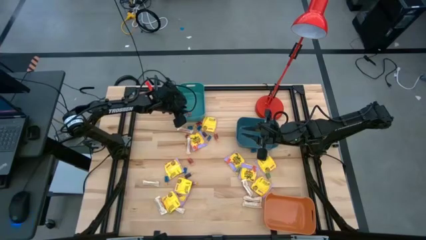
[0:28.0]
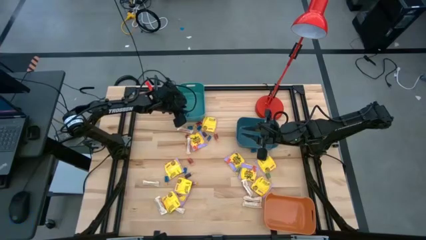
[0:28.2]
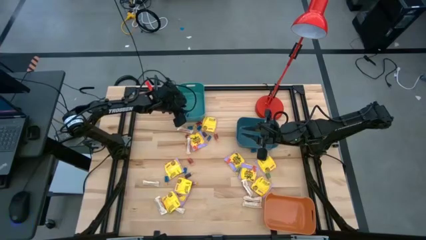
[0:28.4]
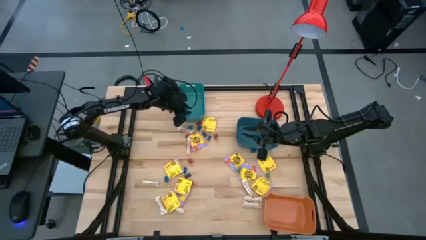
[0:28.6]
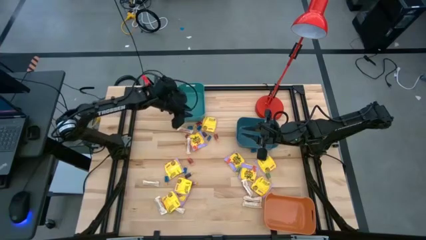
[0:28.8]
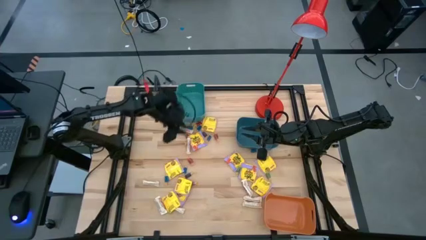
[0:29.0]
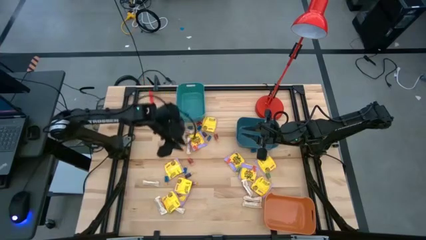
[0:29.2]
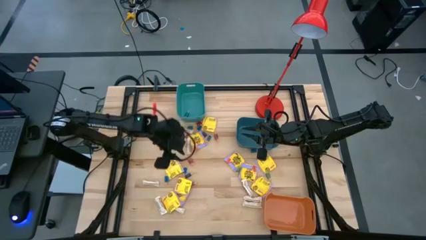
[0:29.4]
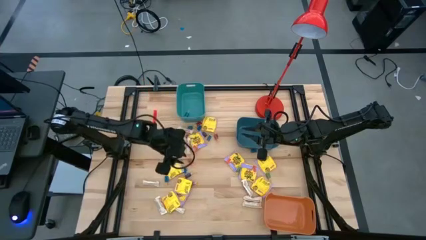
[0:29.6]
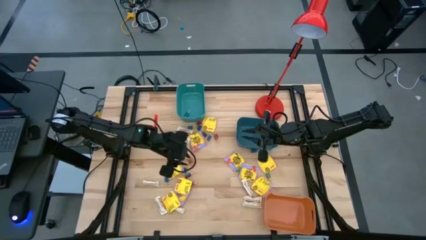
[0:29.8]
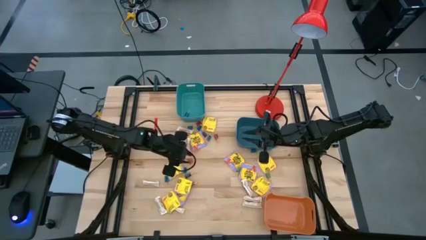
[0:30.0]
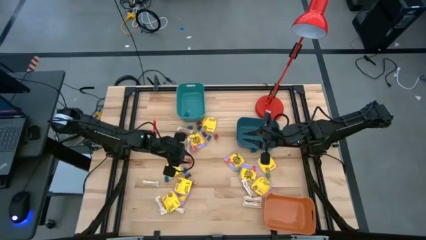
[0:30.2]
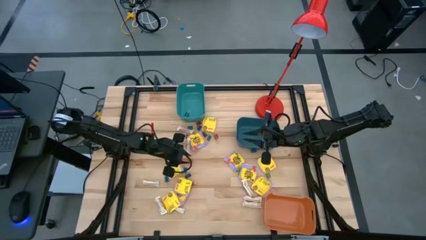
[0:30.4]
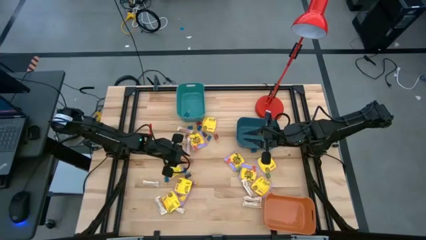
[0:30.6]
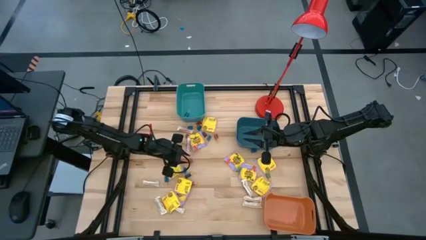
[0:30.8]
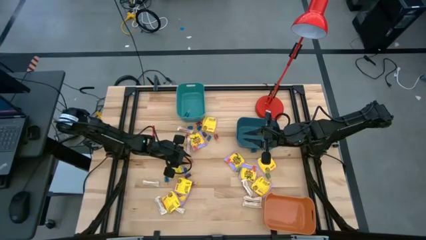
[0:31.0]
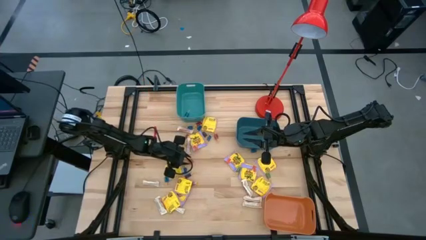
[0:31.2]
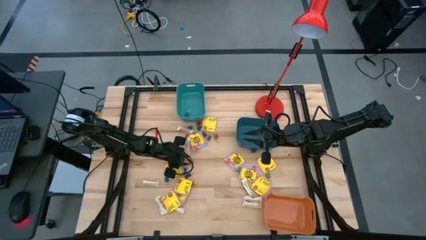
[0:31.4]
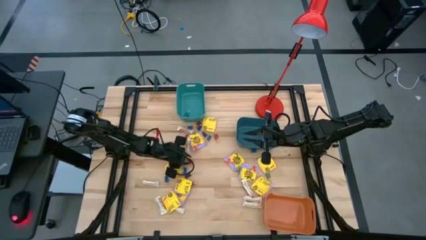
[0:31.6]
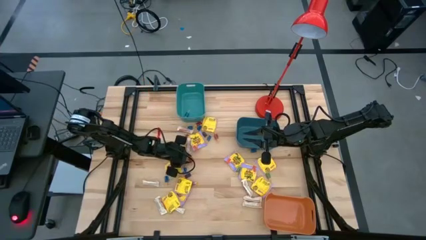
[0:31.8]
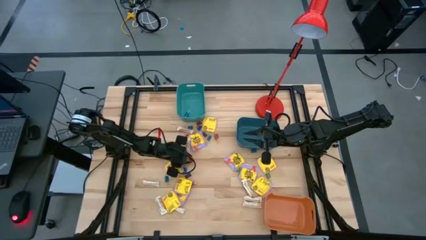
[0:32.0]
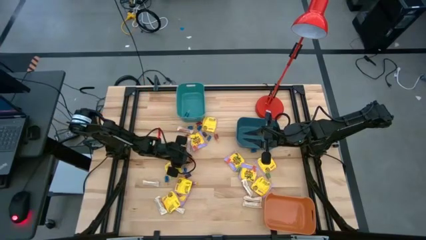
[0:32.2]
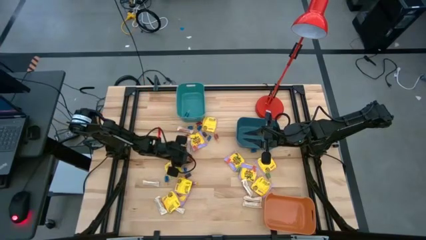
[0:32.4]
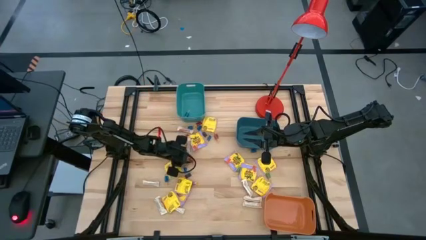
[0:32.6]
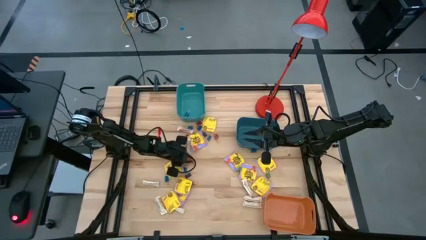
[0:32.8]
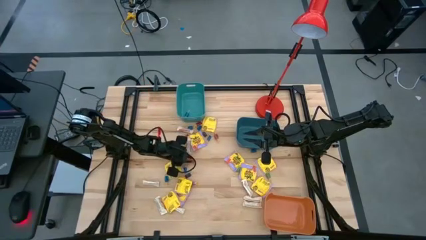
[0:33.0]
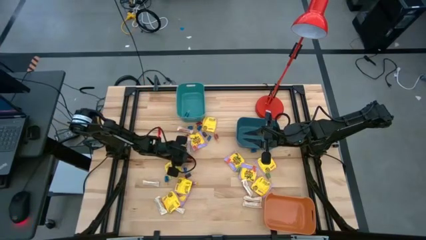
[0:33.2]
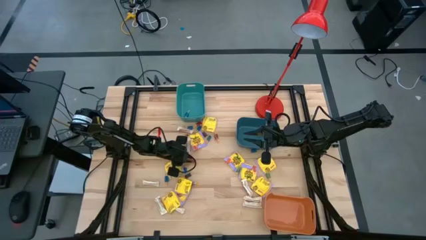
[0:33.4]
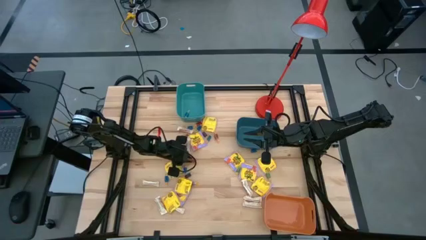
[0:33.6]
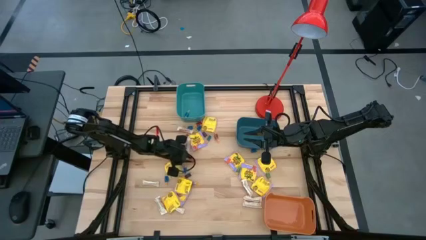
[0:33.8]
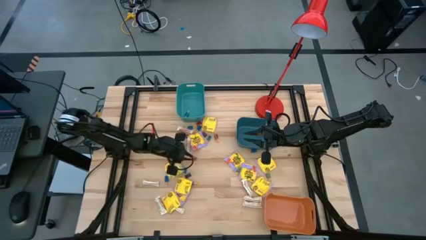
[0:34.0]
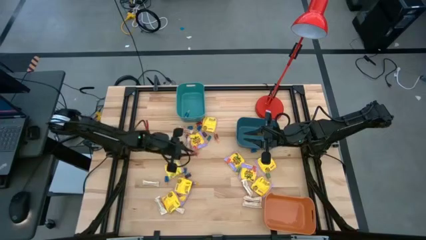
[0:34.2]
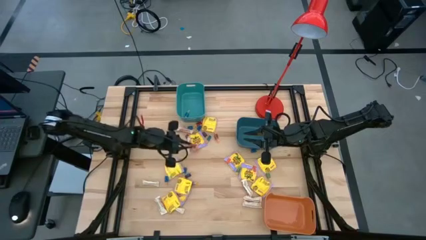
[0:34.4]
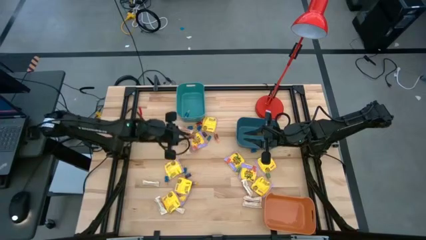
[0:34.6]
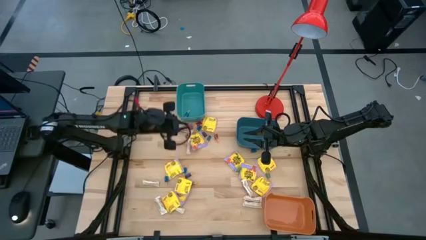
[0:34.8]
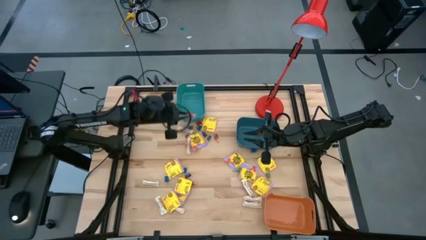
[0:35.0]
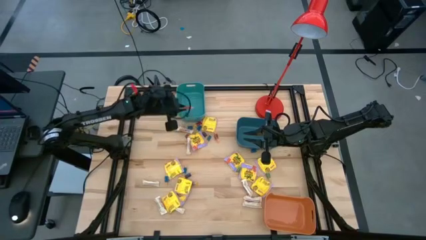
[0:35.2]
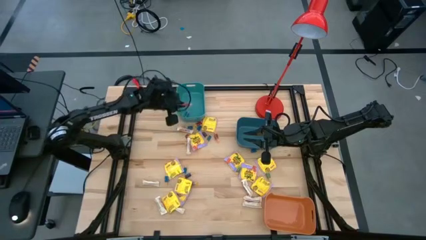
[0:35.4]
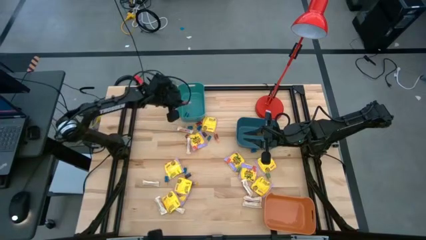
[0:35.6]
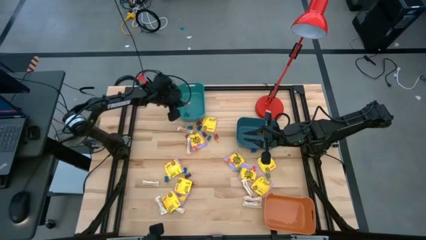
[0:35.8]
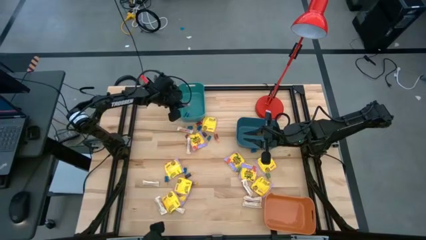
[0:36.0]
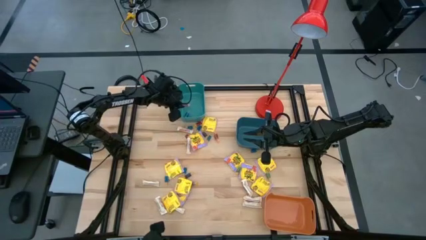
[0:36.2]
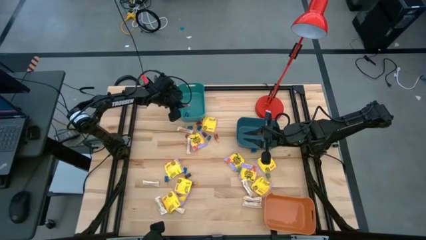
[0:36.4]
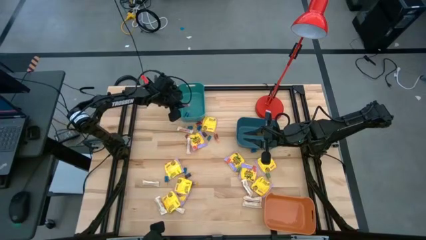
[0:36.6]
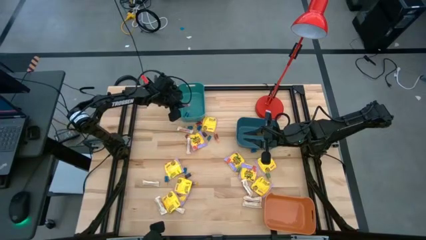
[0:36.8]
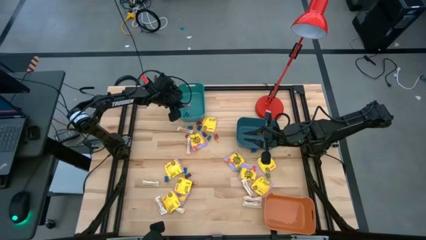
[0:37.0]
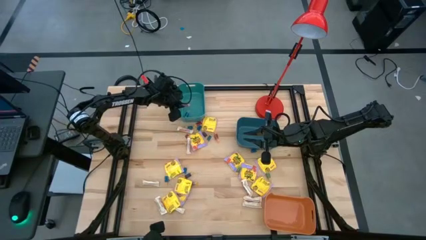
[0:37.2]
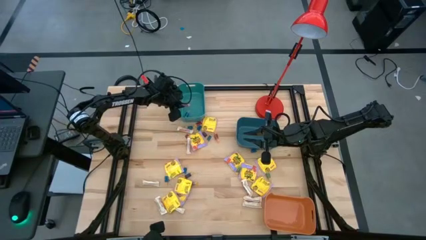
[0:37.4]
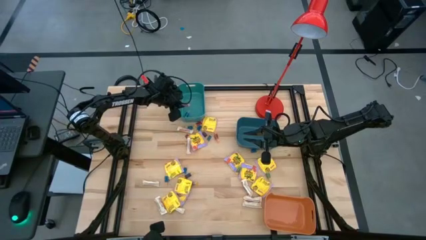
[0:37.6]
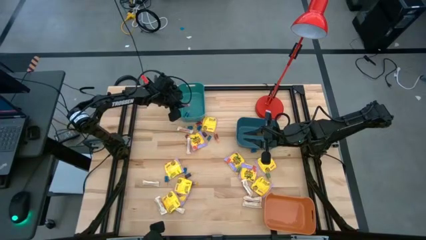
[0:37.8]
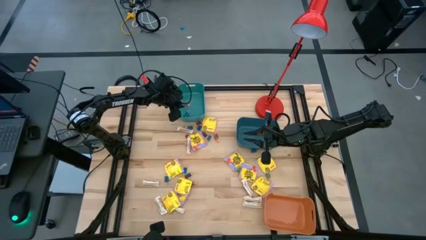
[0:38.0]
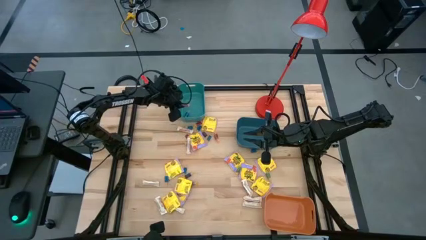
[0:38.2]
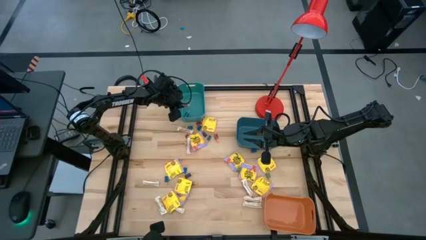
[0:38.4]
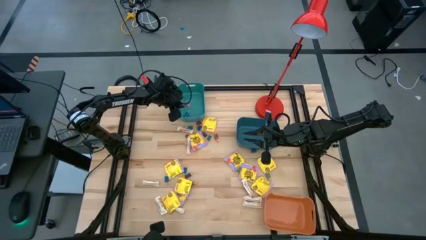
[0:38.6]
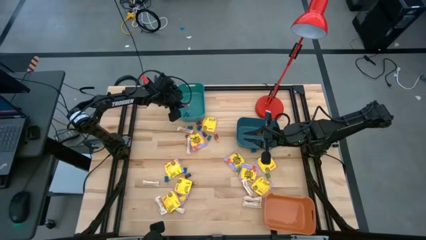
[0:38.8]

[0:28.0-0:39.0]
Task: Sort candy
Put the red candy into the green bin

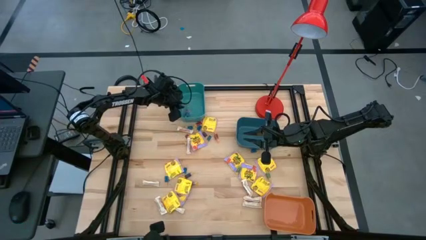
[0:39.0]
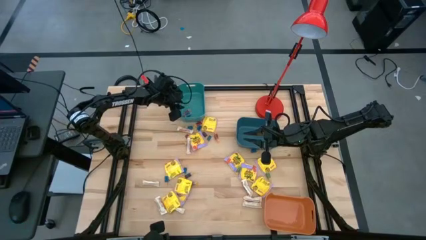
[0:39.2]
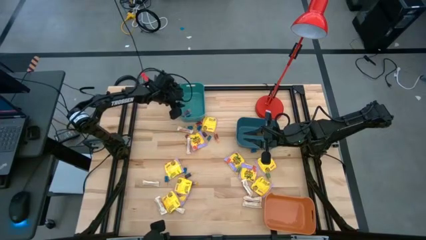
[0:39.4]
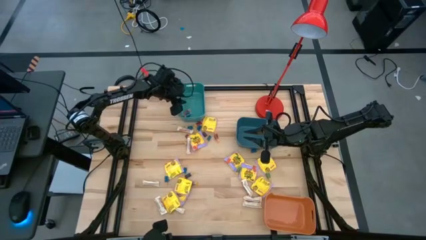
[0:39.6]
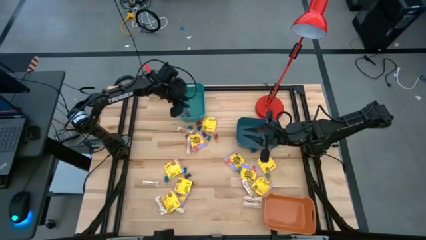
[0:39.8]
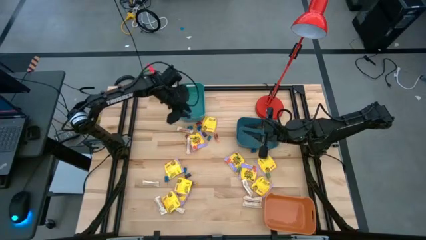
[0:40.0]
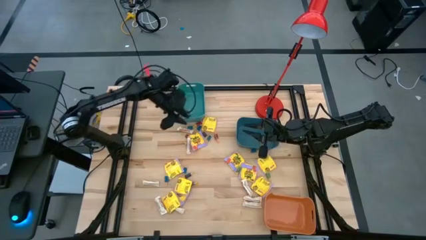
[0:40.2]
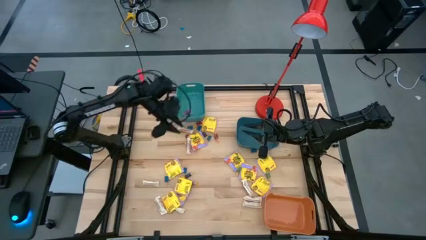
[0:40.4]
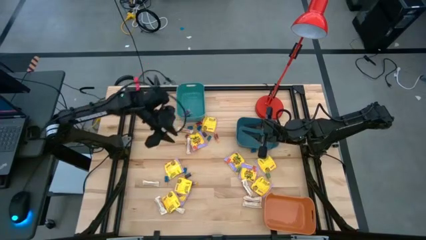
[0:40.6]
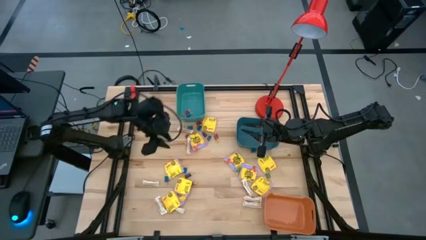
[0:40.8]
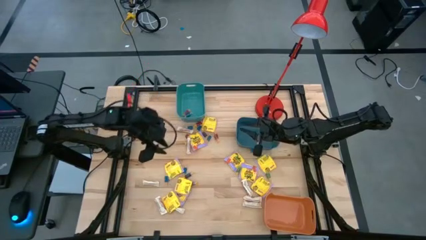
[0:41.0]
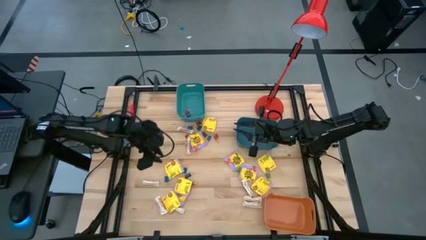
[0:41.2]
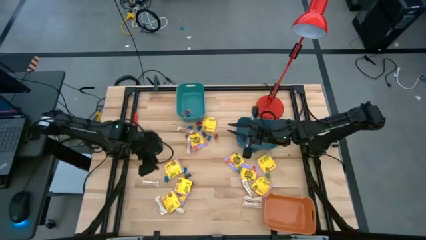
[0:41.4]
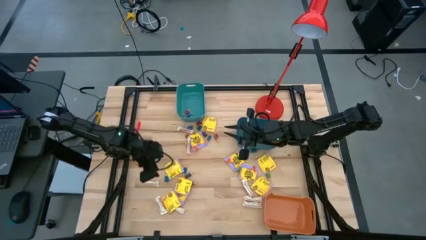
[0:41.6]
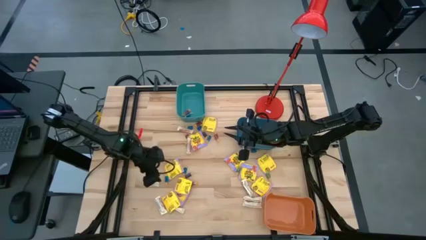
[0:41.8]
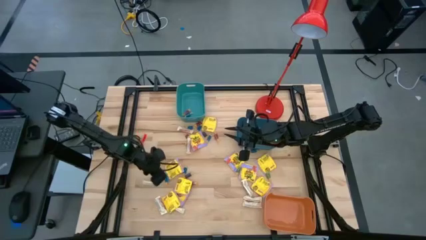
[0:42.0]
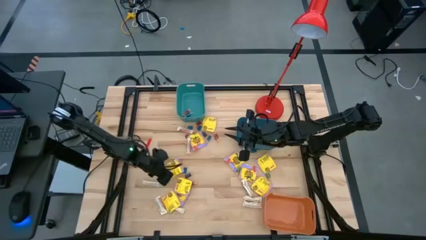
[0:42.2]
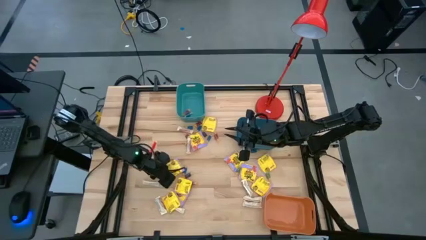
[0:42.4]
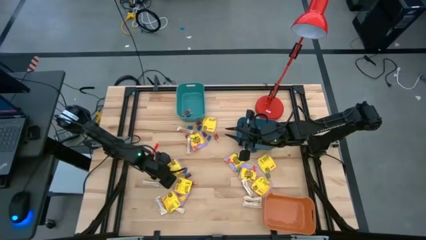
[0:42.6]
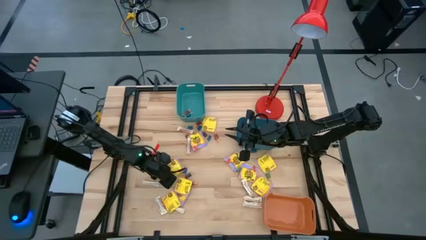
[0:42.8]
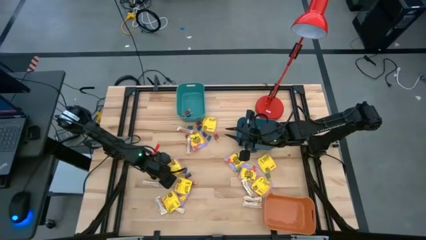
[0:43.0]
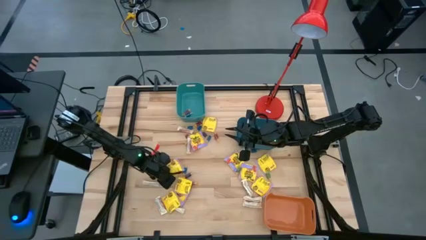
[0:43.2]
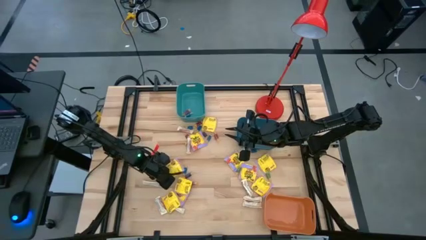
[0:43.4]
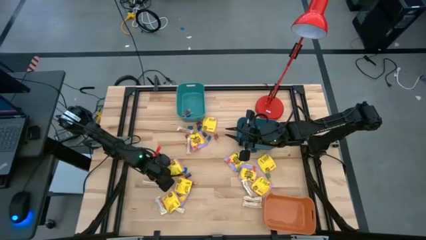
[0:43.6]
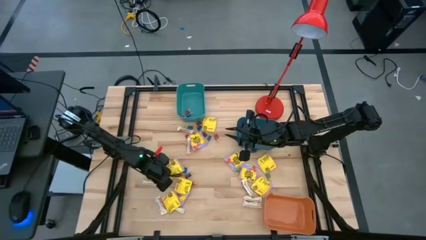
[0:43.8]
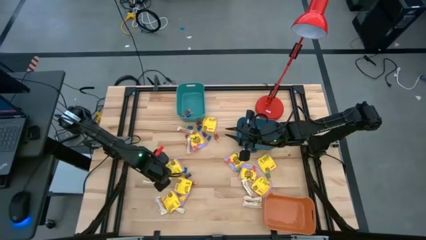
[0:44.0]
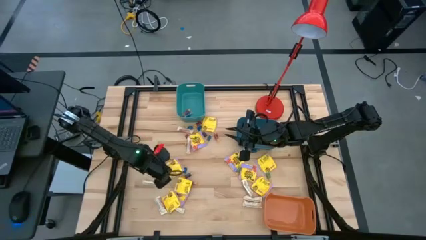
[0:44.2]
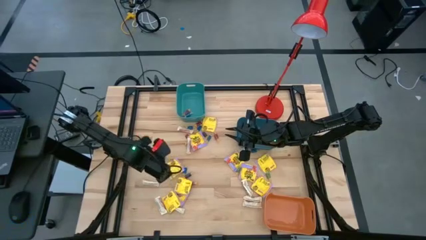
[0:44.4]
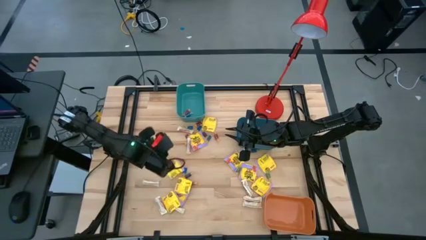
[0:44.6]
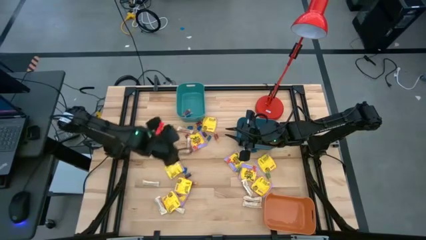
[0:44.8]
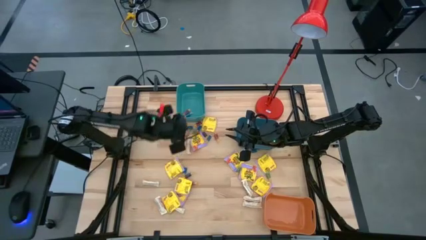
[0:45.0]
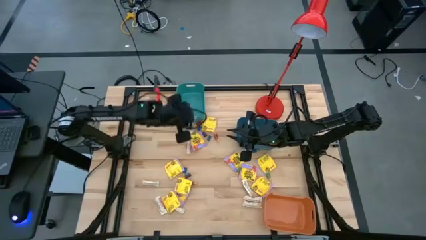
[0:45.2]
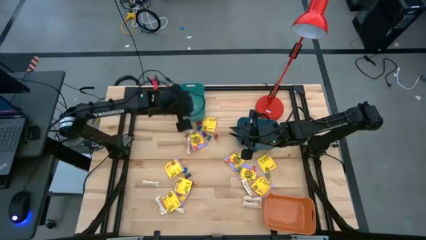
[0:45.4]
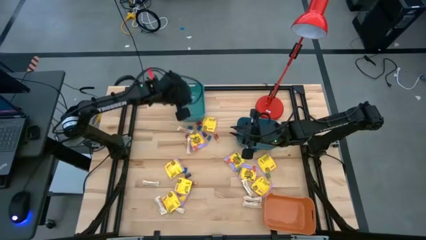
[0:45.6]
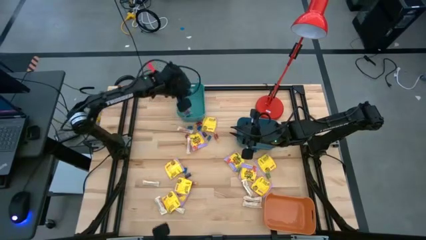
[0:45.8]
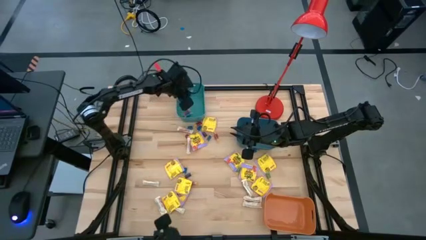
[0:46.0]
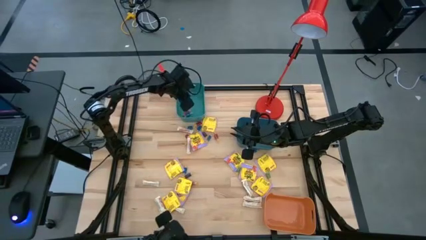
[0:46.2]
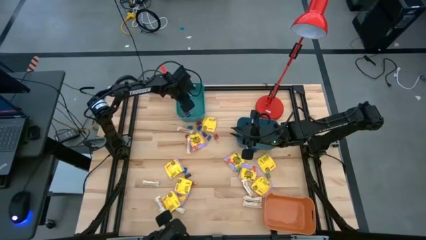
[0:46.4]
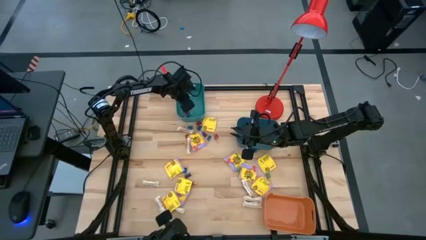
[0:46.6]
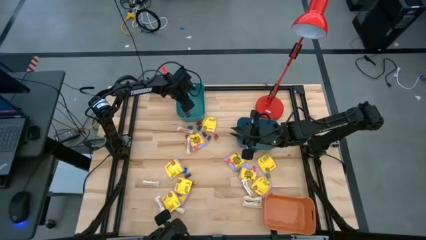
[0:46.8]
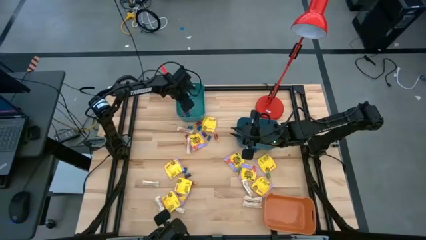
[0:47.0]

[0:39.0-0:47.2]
Put the blue candy into the green bin
